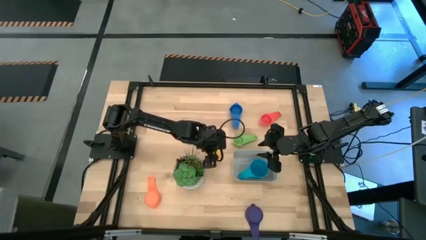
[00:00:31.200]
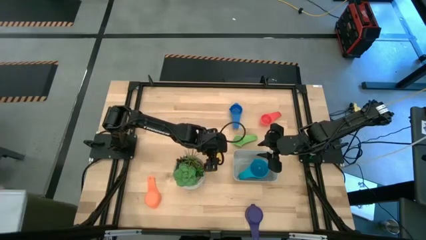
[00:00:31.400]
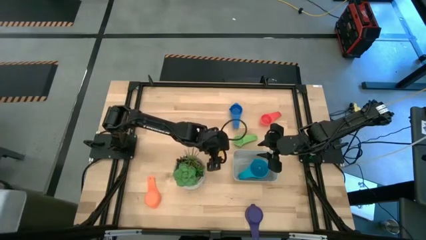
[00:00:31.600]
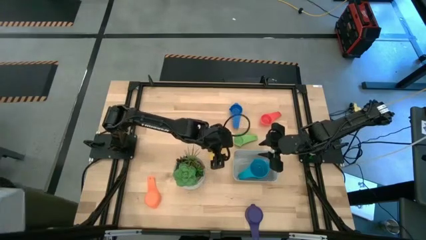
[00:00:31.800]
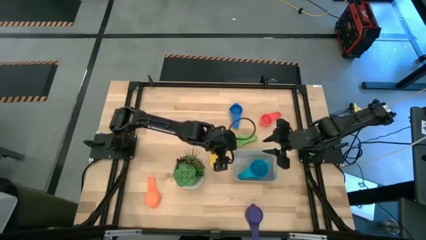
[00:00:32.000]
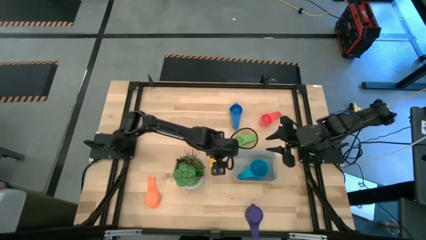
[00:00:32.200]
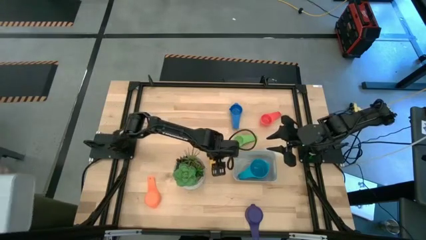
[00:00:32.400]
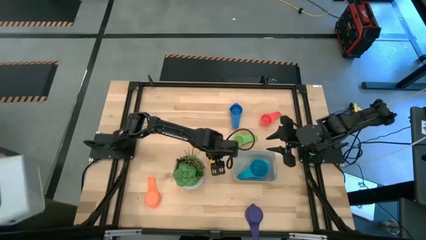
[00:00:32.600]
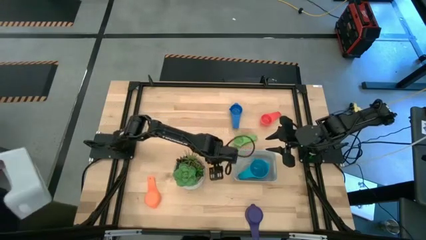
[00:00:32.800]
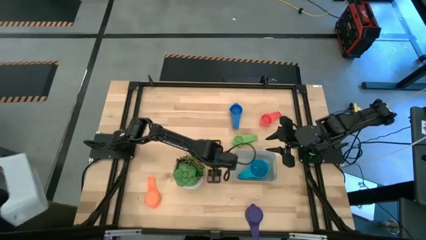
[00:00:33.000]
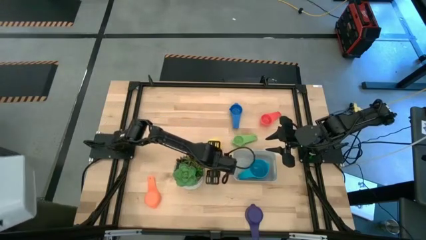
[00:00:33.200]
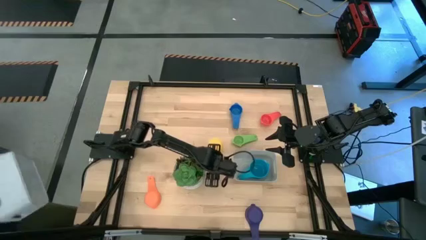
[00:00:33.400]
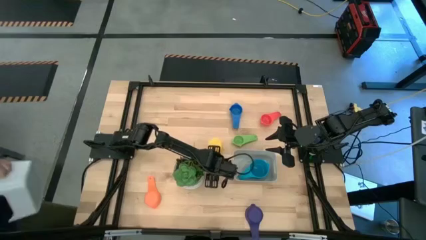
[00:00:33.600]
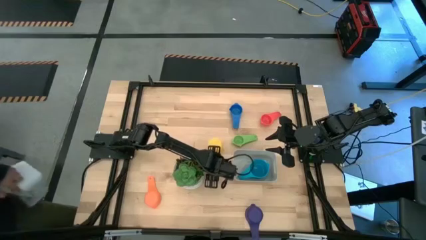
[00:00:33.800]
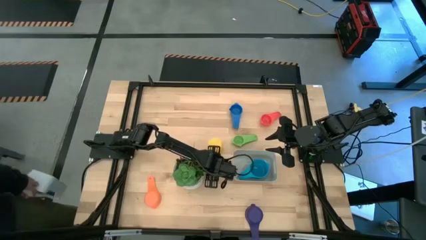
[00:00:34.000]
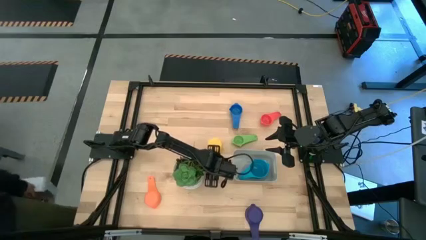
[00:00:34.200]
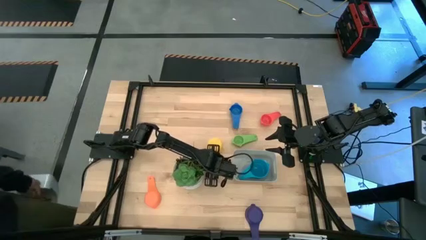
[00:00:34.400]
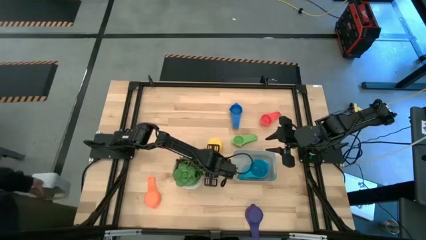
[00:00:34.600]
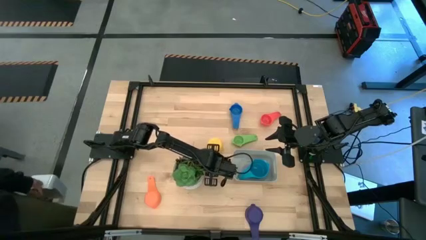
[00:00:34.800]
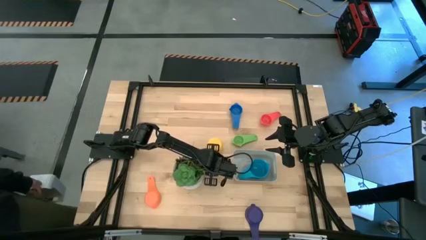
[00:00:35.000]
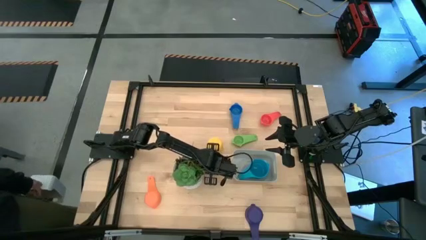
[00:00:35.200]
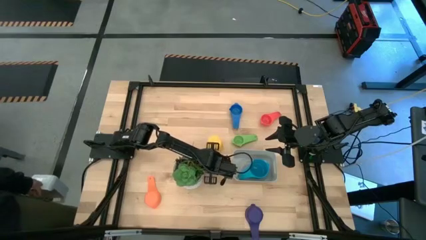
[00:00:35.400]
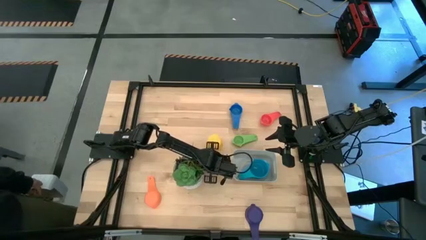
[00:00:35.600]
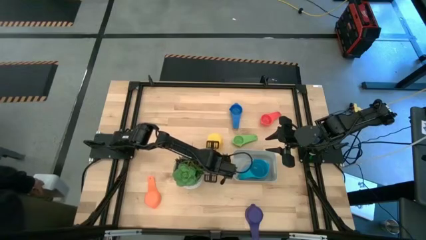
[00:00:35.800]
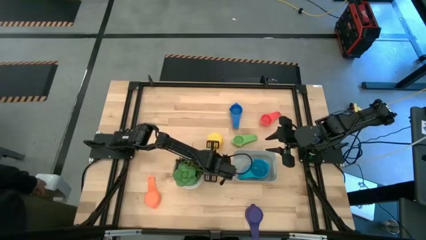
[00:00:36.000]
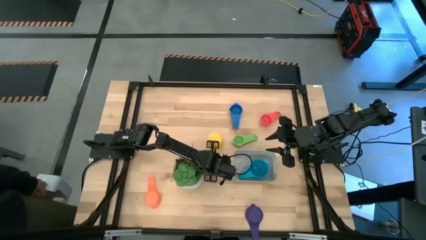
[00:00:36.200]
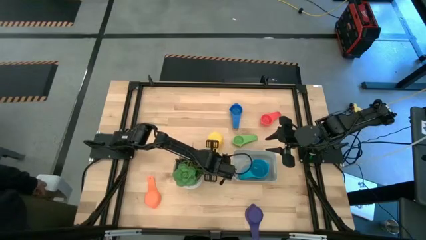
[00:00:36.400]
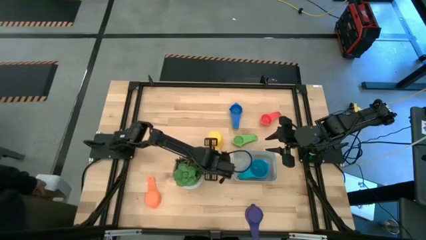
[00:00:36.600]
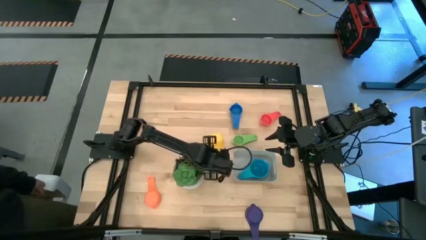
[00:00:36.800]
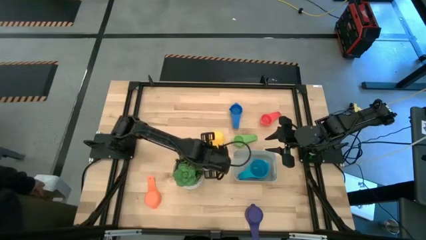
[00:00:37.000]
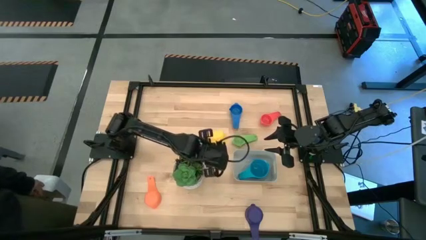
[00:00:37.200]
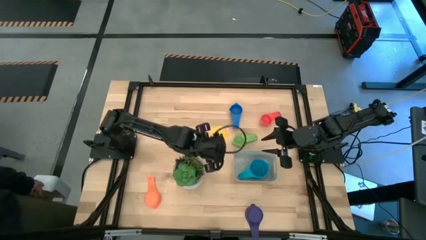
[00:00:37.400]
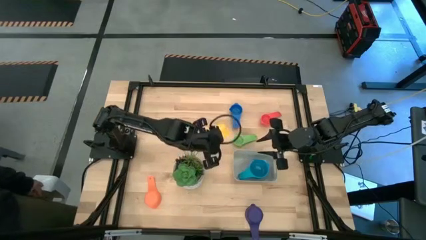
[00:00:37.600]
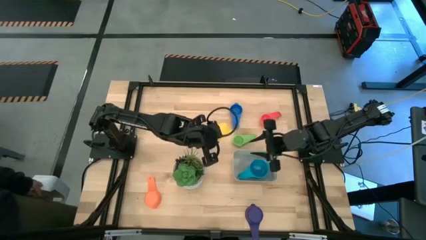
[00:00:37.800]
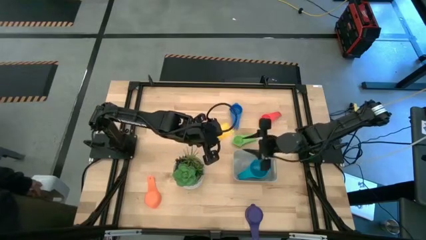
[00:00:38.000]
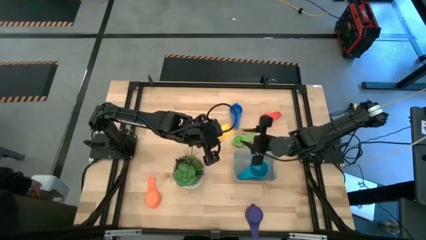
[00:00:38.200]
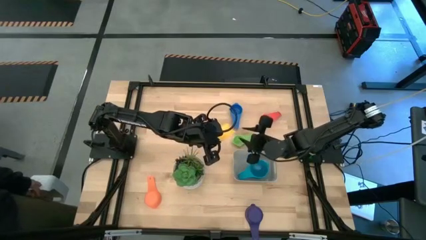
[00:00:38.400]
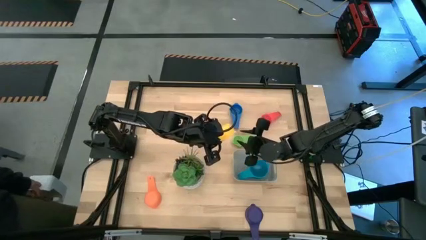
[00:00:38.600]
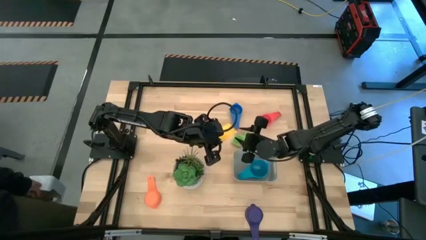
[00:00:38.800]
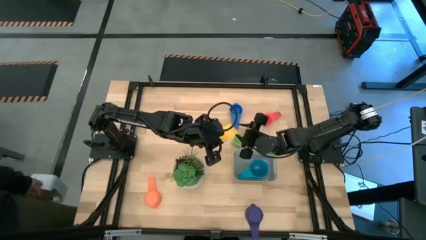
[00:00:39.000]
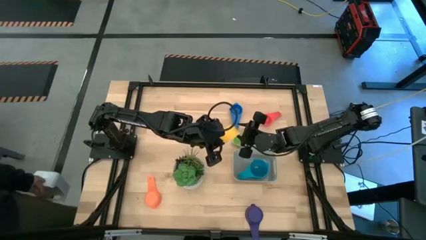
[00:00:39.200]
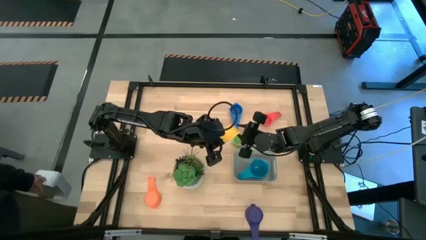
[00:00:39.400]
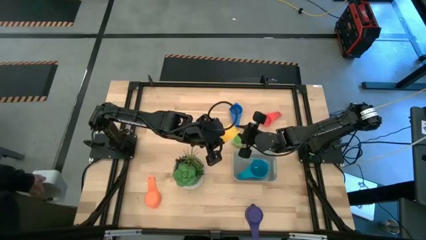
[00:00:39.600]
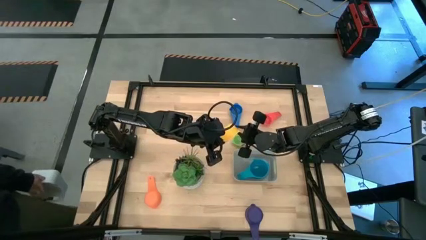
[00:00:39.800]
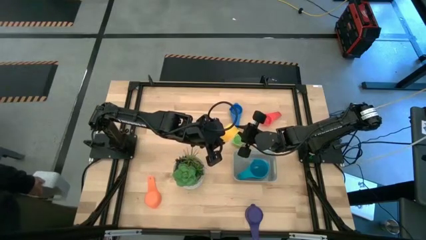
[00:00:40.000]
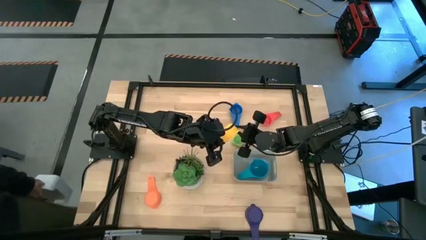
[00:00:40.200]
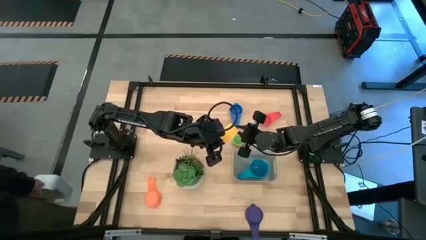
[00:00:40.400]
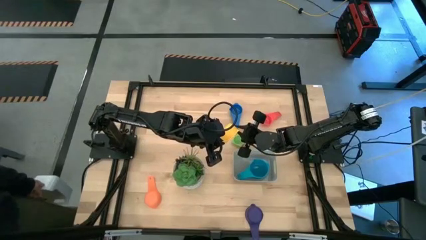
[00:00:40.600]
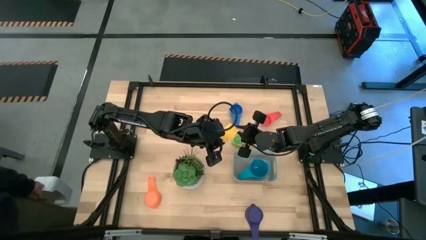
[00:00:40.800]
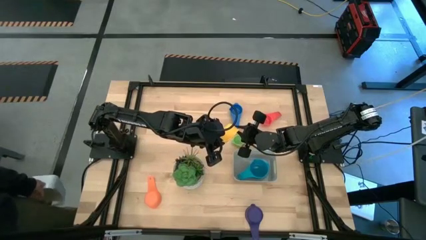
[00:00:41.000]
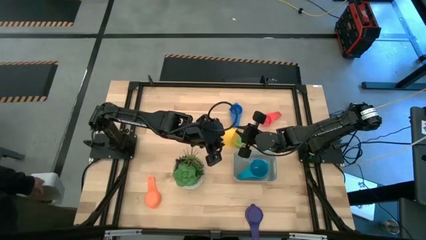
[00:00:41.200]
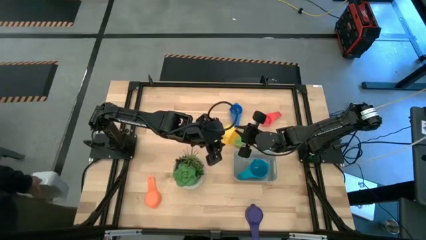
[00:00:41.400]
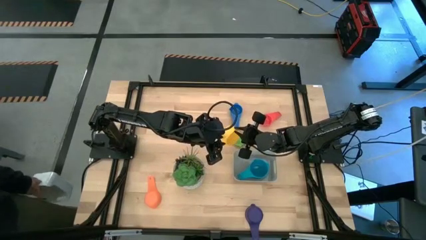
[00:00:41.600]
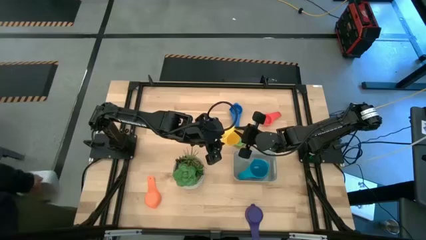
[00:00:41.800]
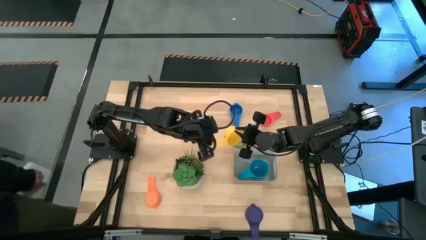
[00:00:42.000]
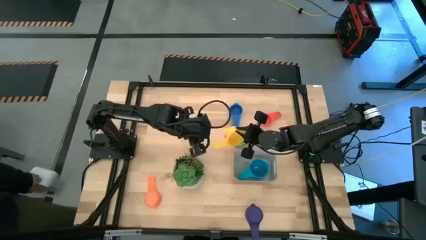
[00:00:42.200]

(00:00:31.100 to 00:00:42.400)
Task: Nest measuring cups in basket
Stack the yellow measuring cup on top of the blue measuring cup in the grey bin
